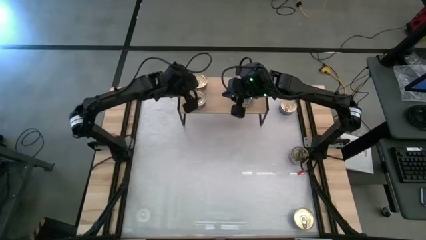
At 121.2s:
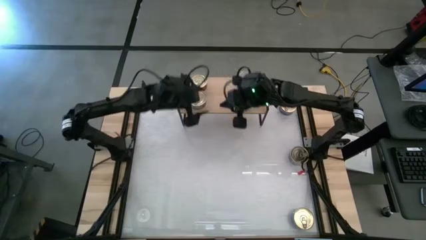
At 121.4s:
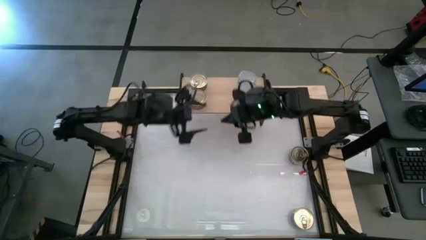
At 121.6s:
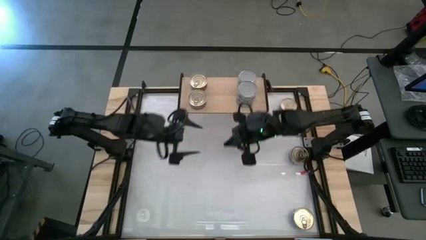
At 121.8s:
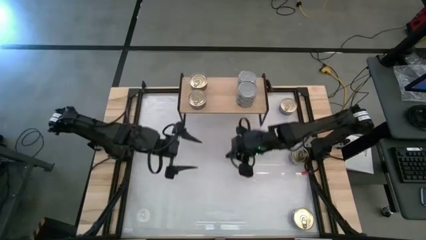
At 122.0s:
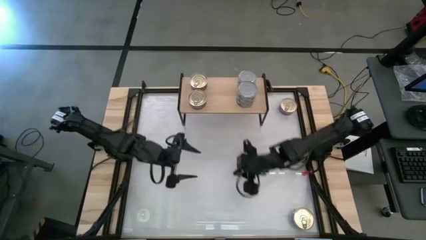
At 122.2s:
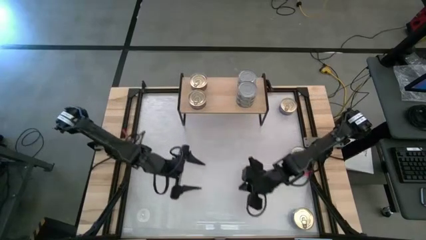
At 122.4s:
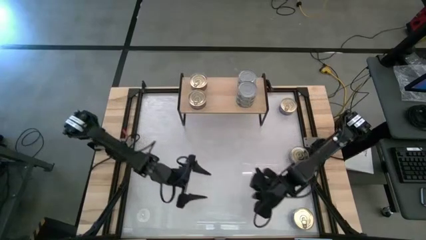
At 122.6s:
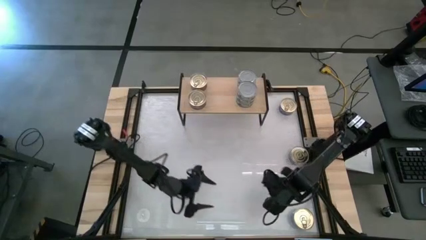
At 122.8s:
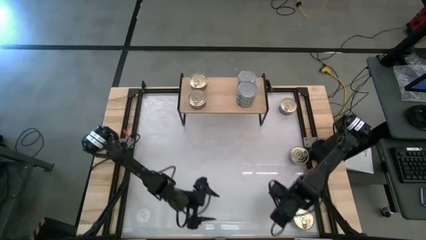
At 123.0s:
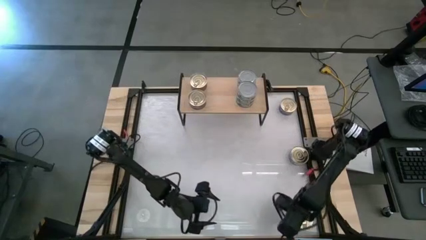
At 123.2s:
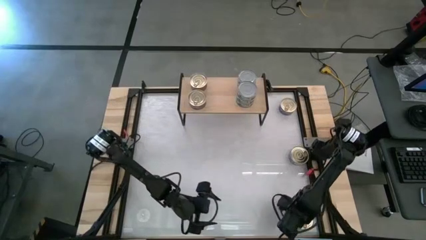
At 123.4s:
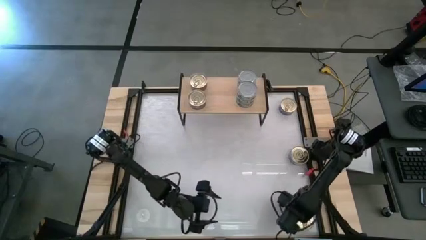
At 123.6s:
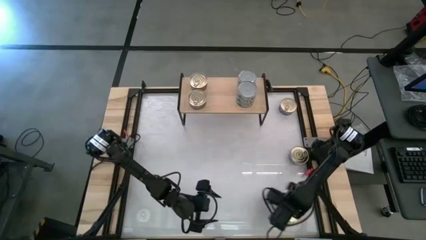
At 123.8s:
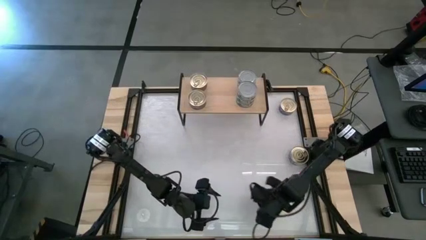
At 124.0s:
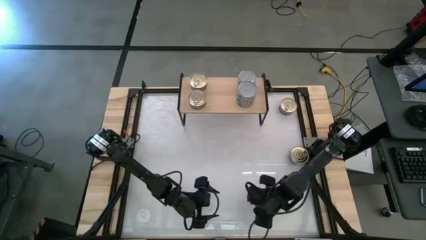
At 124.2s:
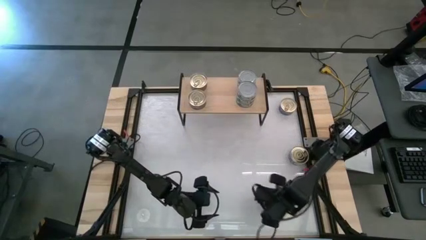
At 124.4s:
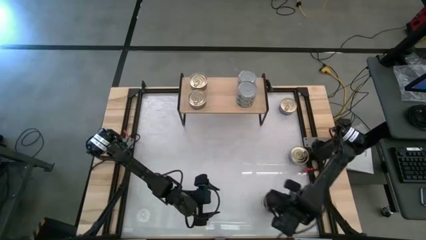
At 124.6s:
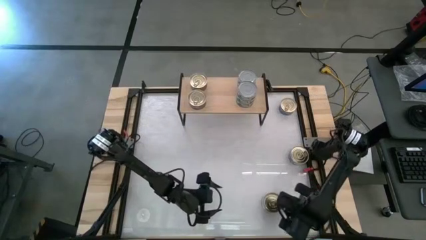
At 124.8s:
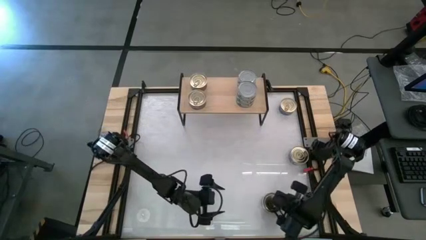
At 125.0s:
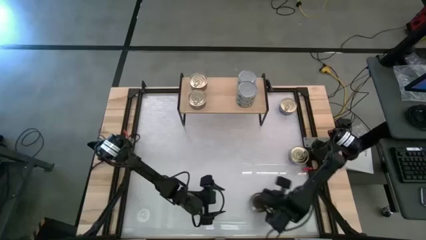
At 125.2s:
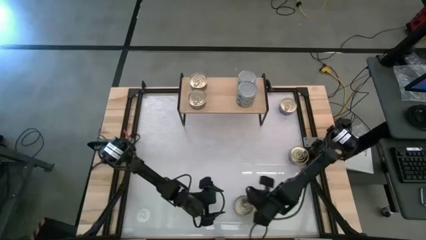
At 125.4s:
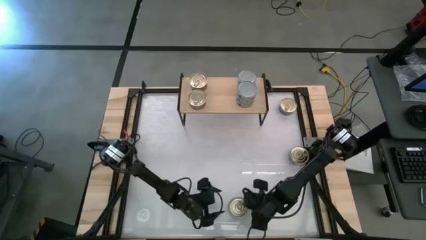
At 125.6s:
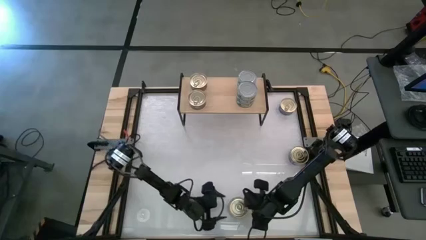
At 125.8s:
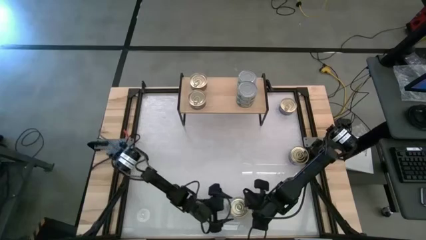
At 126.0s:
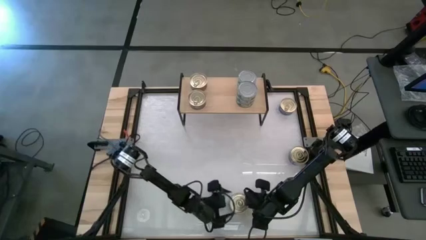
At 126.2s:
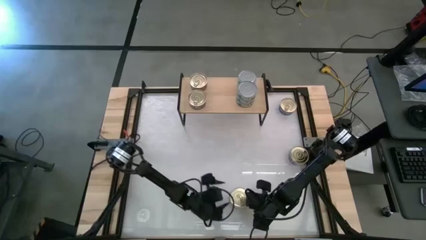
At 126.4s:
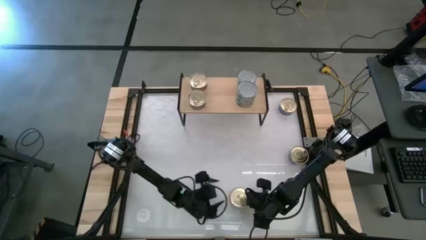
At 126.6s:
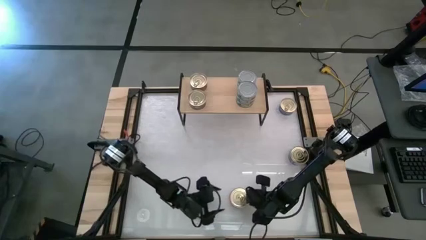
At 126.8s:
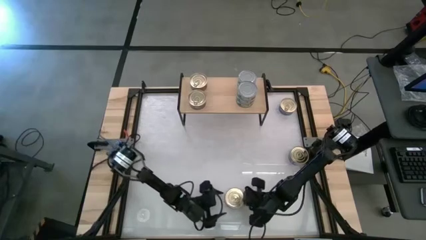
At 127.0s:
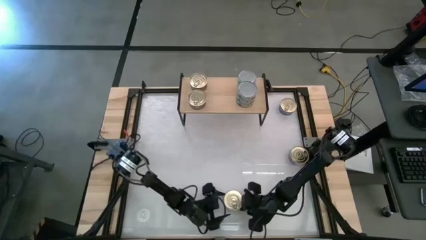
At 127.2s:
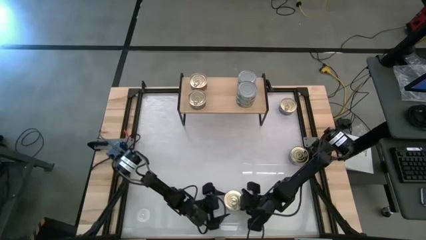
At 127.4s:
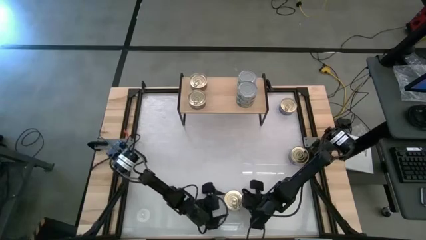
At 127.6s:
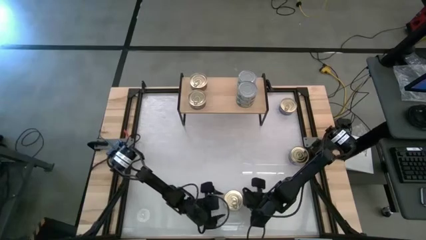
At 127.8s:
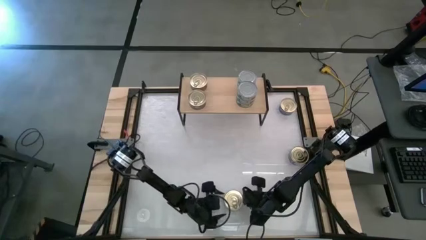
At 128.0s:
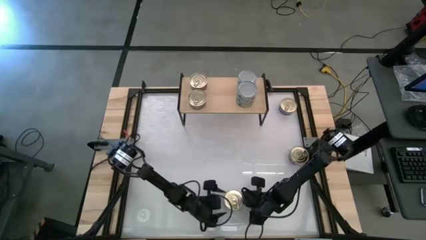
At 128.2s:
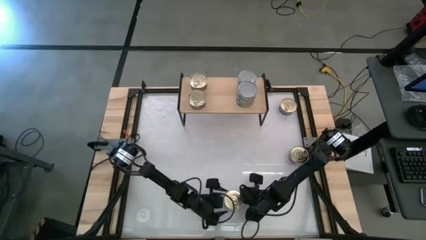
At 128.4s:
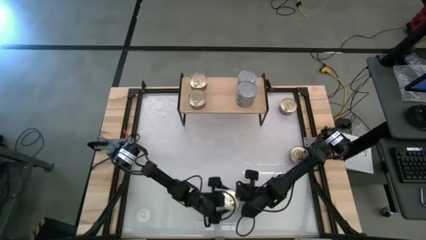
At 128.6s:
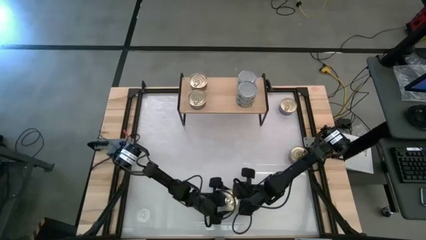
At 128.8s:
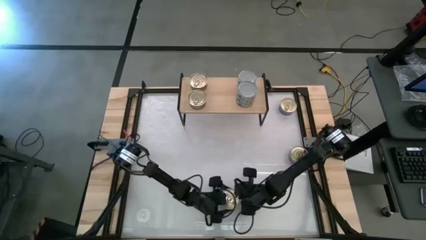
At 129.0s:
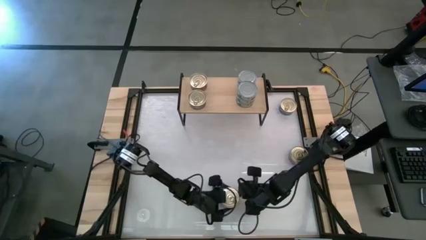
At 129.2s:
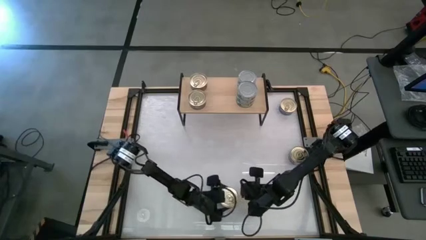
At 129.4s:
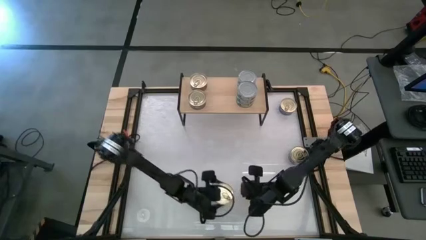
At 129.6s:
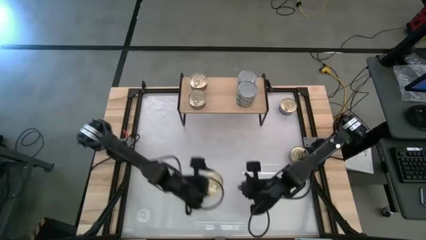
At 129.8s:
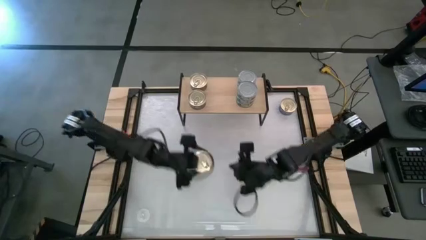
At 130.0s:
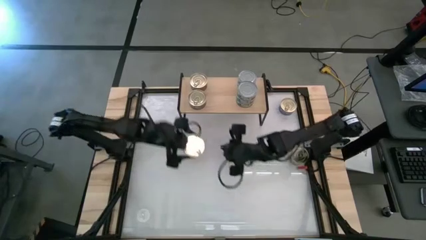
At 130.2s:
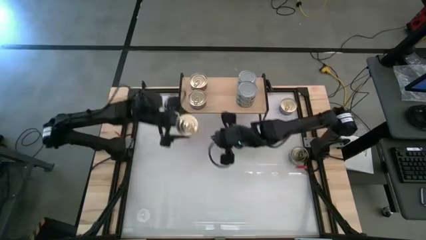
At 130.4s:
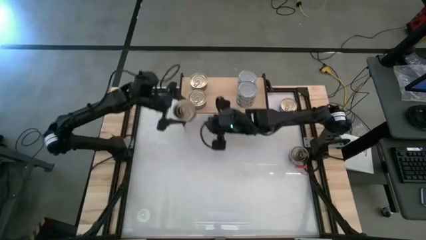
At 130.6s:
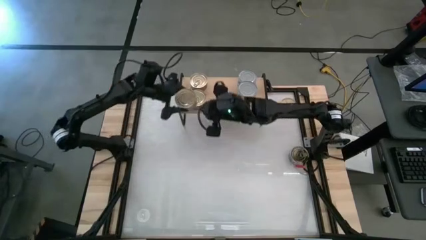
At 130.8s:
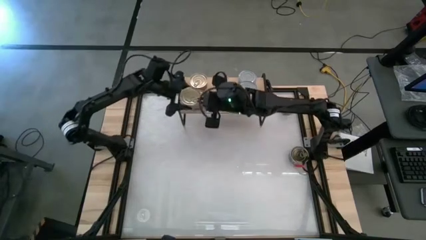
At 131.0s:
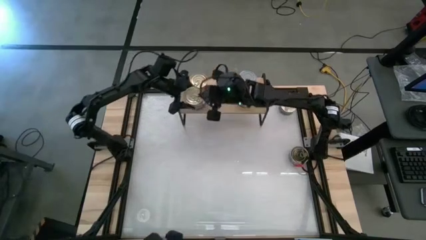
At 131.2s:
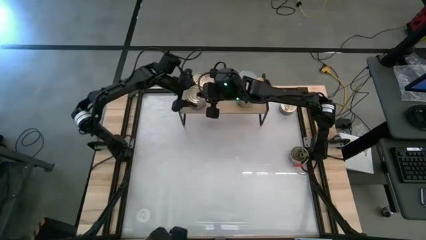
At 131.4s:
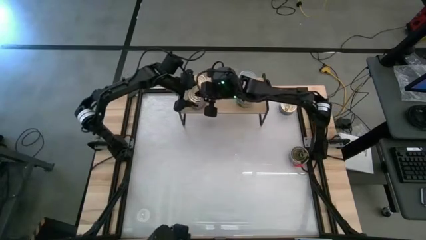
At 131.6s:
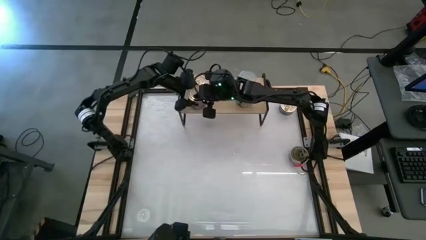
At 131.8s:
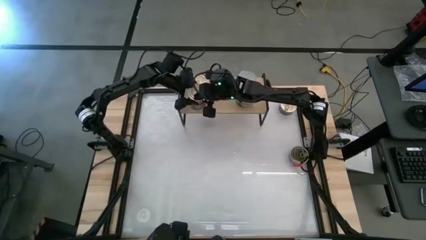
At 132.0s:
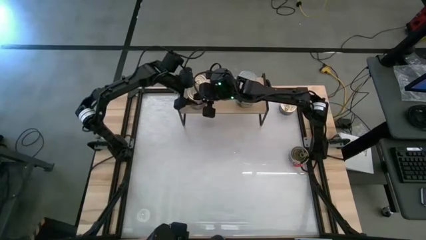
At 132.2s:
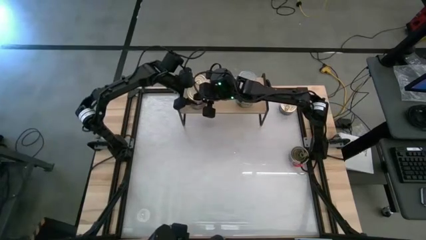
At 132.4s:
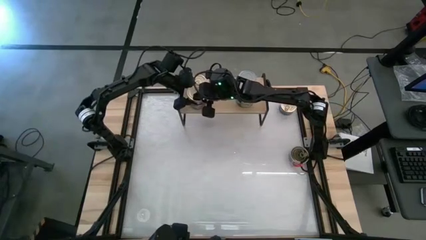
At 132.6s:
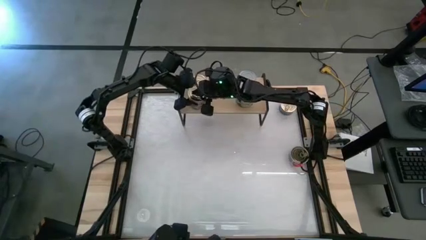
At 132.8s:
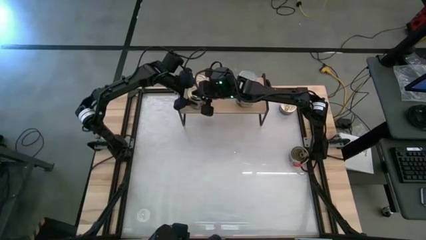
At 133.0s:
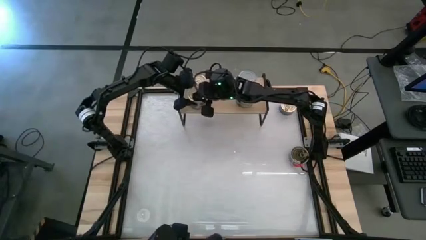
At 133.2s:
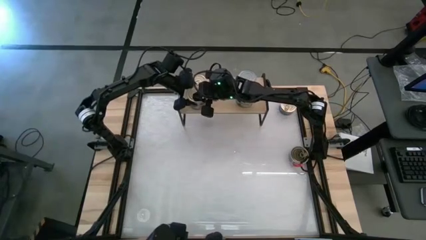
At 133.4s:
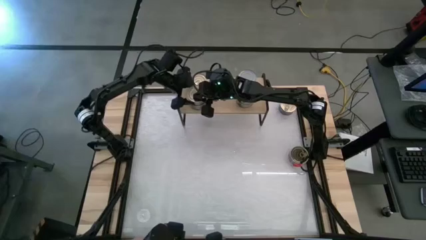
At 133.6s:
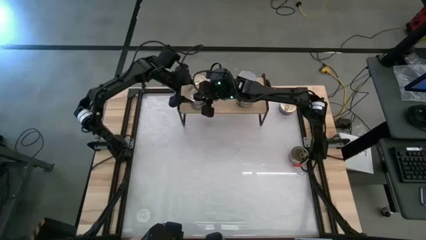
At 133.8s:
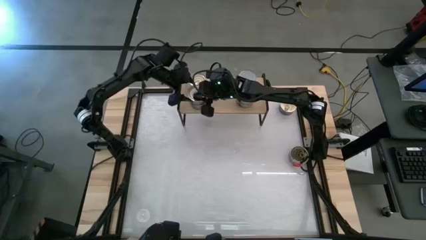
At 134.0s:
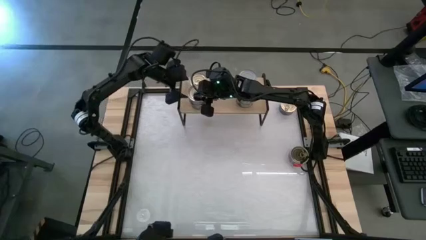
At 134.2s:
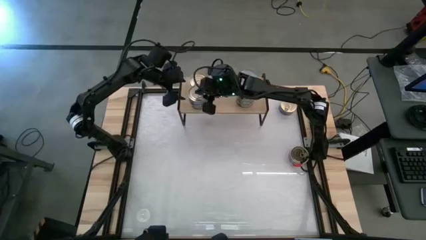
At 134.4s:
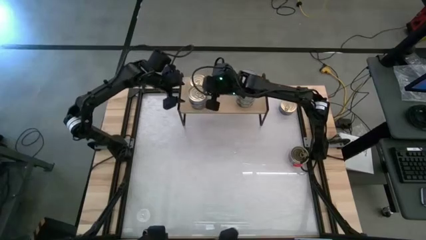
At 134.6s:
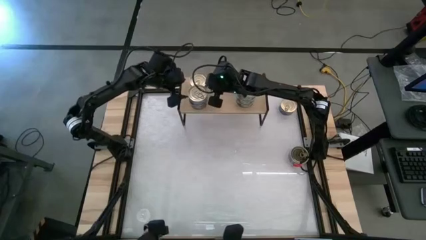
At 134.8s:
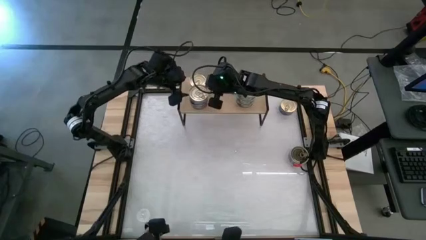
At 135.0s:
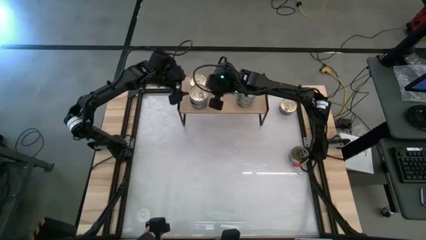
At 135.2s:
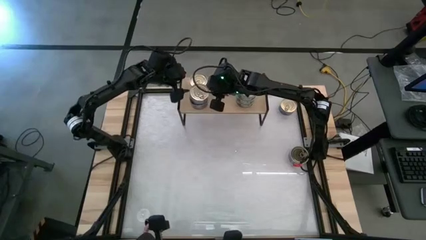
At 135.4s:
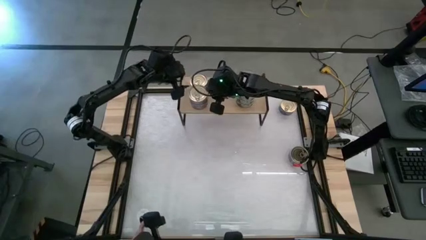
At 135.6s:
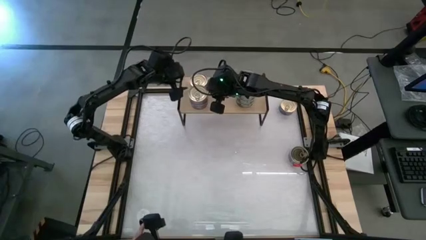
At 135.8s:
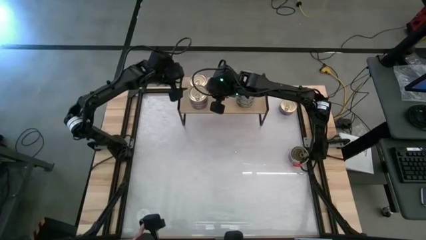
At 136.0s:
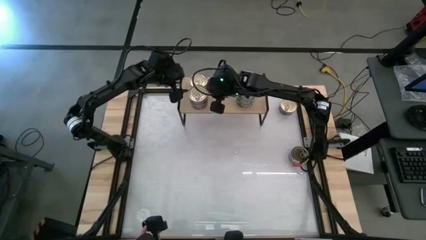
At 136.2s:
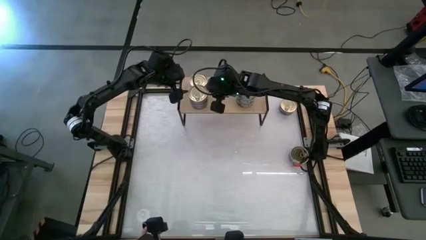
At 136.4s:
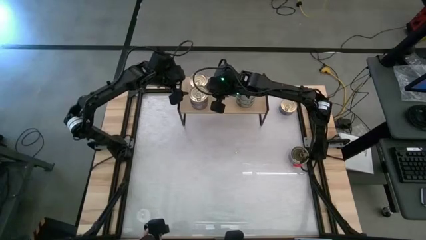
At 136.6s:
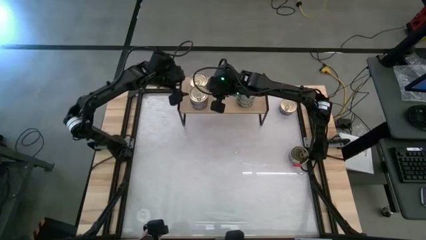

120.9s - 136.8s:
Task: Stack canned seafood by type on shelf
Stack the bottom blue-pink tuna can on top of the blue-pink tuna can on the shelf
